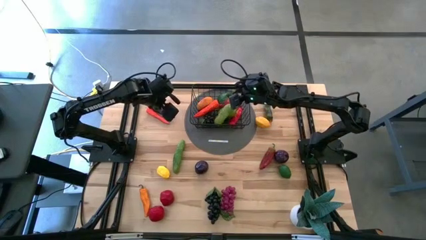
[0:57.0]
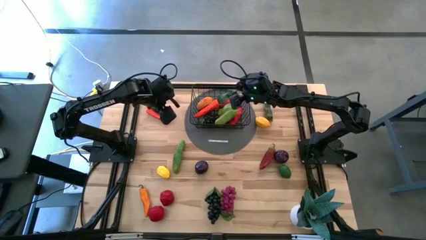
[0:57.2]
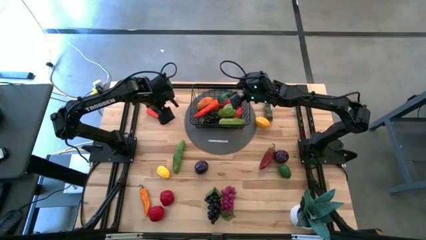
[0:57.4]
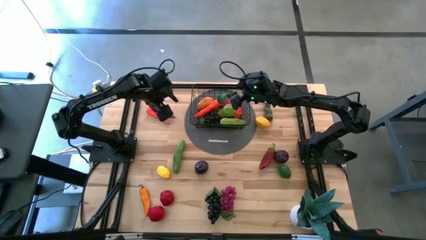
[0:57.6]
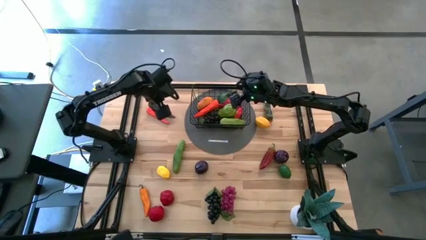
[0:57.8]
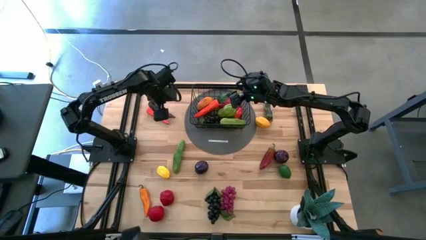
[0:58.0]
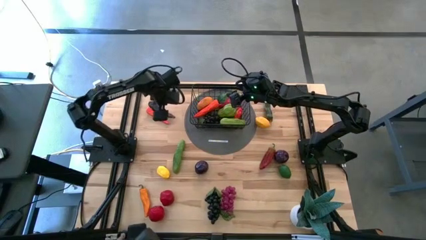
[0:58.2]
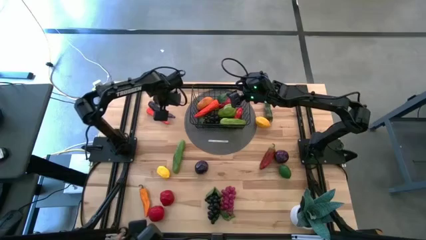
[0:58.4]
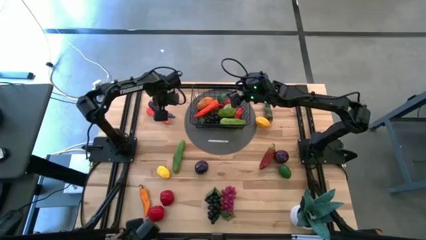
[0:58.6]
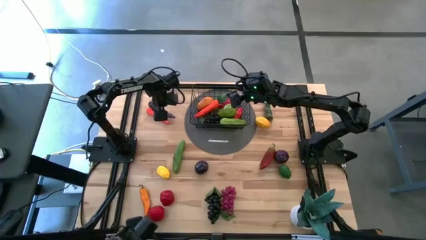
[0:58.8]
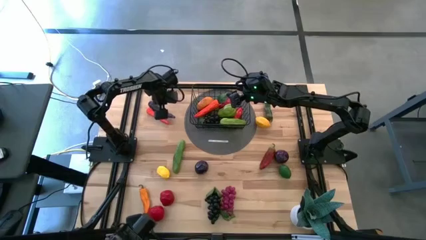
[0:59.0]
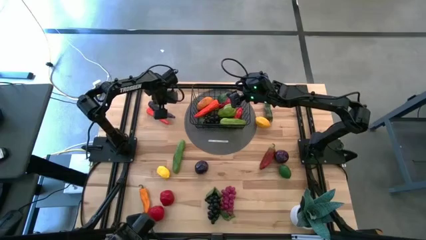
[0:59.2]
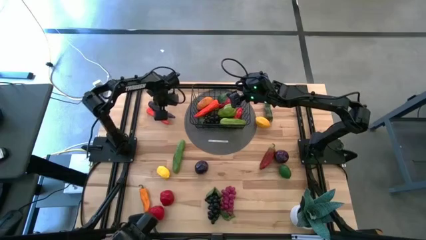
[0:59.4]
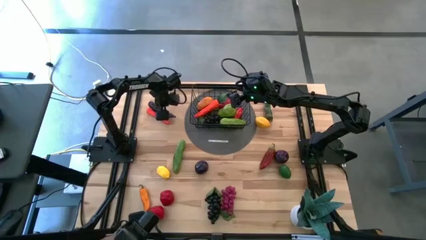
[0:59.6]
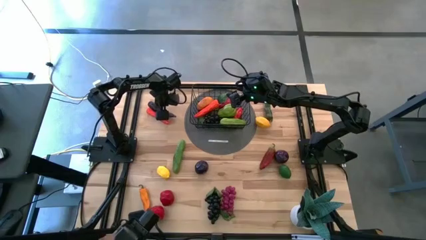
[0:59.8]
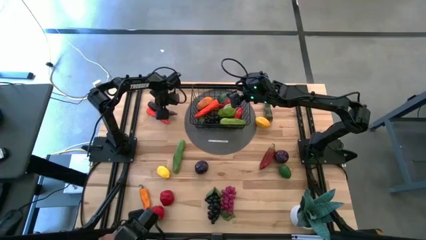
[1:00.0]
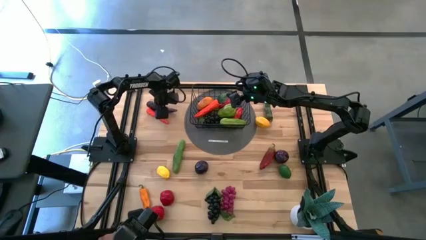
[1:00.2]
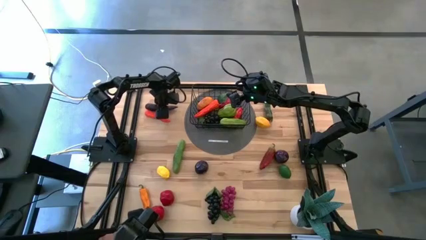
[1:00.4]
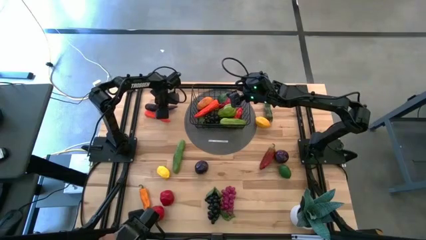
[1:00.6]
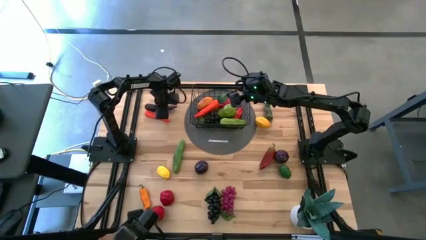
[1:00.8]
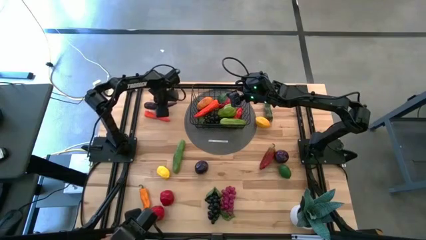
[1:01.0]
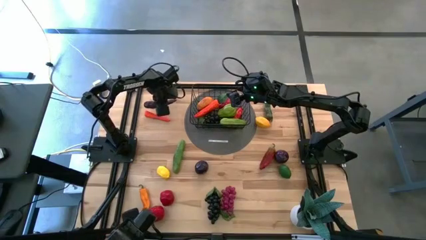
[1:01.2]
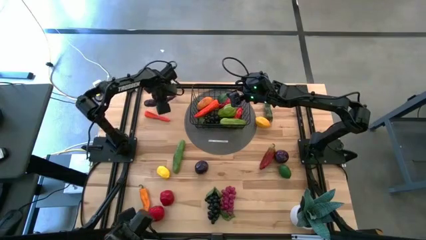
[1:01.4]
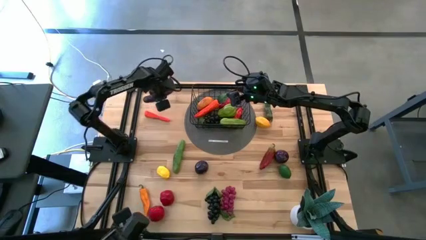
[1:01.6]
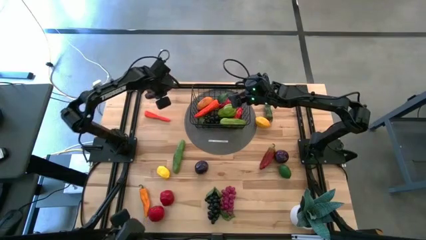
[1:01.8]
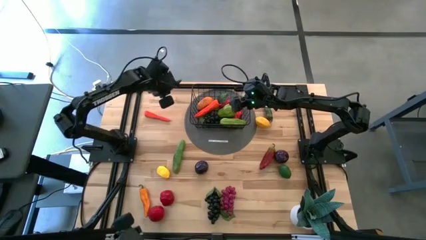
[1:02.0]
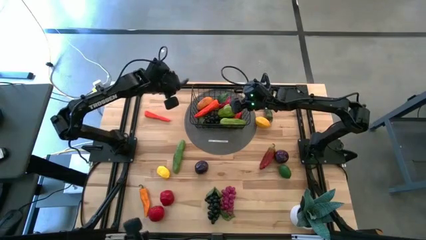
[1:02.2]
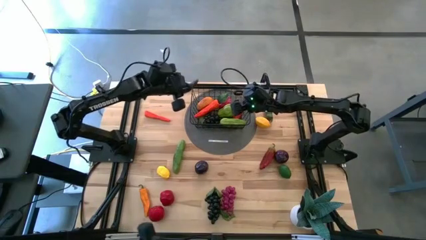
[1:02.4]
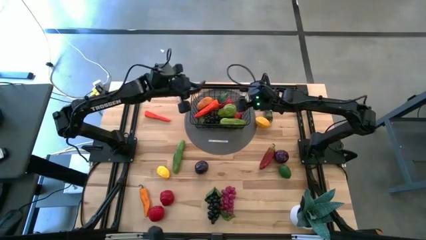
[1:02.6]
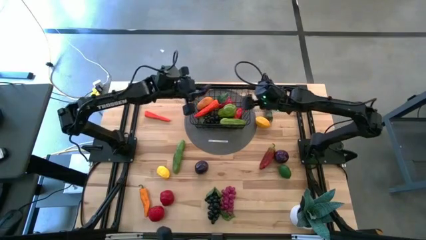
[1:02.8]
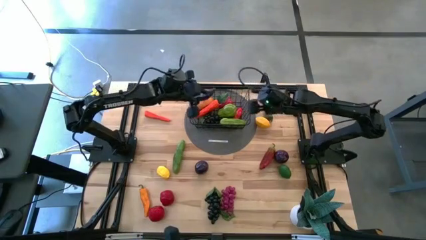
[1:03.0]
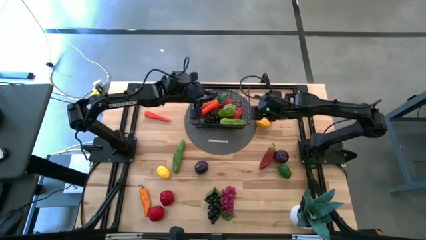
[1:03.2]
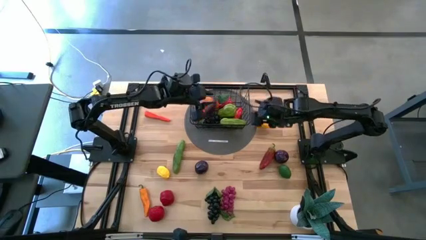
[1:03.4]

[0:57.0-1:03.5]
Task: Build produce basket
Put the purple eggplant into the black wire basket

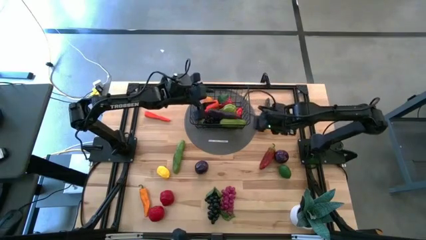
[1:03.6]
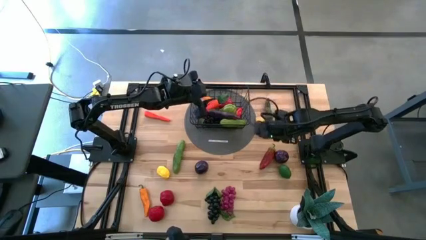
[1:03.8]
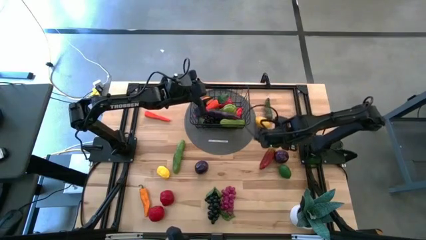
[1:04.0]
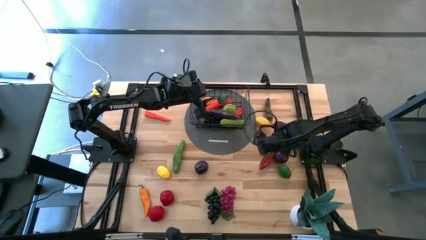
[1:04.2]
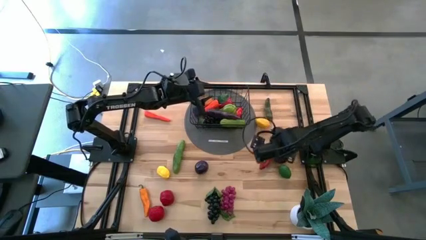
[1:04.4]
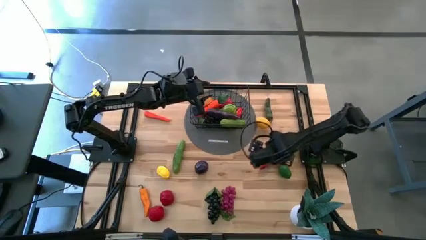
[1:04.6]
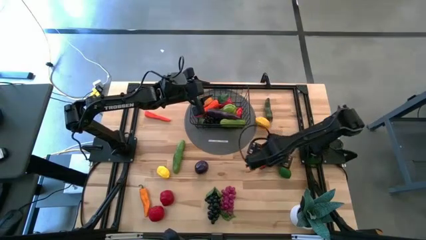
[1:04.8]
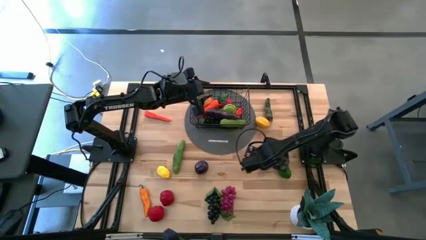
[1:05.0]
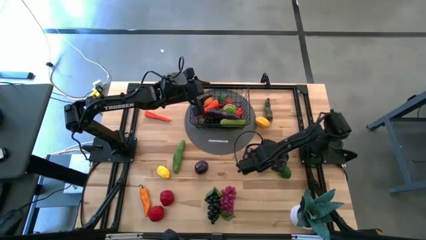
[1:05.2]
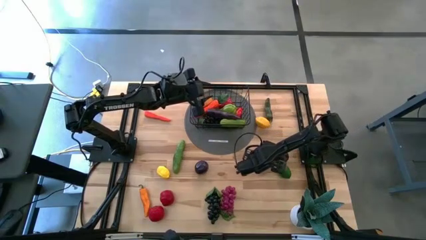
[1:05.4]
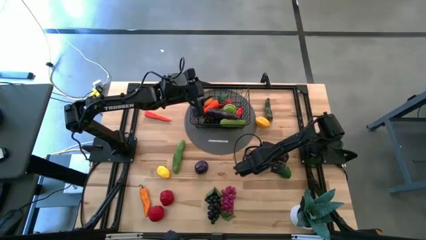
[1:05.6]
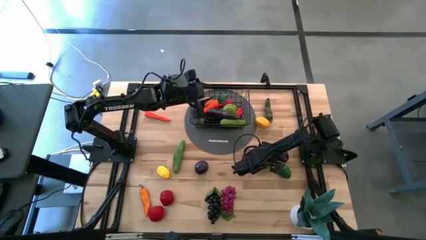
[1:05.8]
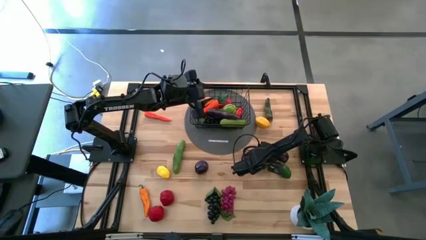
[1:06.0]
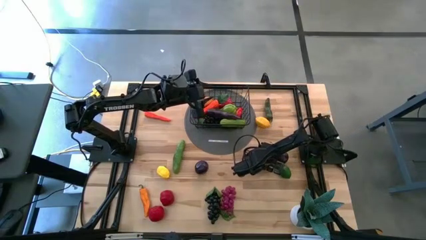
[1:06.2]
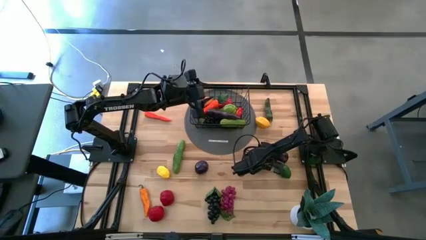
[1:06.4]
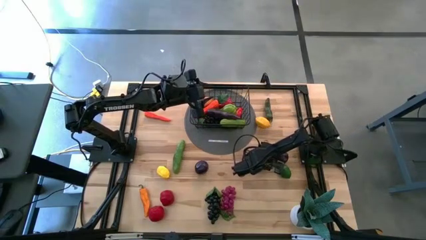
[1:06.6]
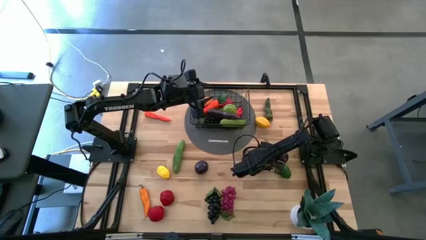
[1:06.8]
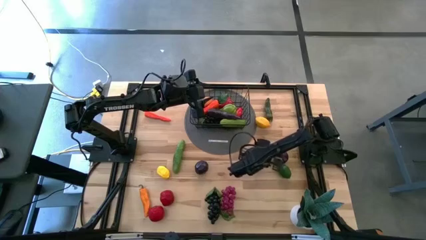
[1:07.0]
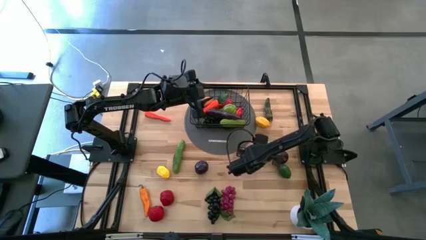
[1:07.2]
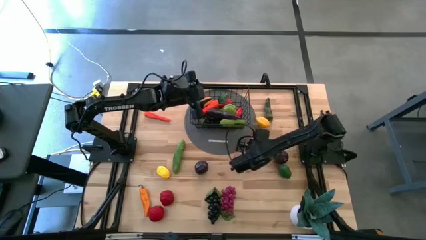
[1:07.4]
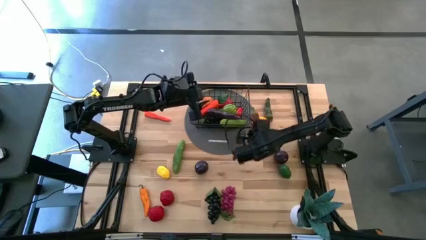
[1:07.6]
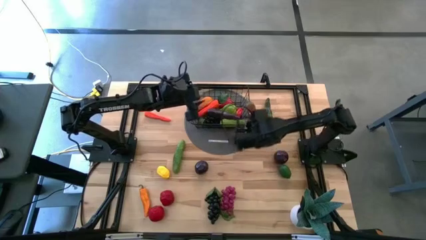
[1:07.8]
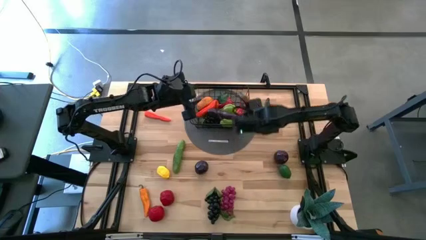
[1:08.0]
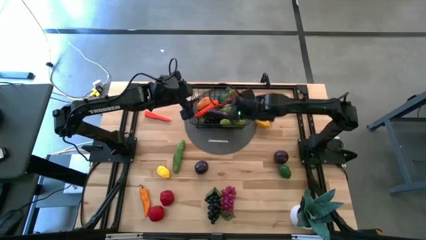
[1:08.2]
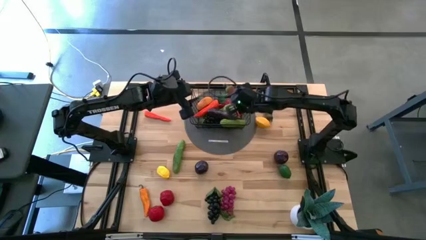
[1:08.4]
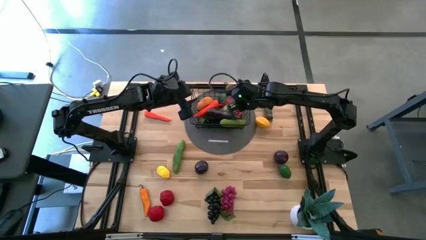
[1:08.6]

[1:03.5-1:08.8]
Put the dark red chili pepper into the black wire basket
